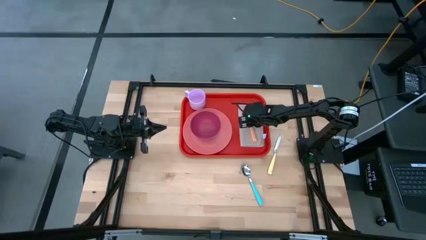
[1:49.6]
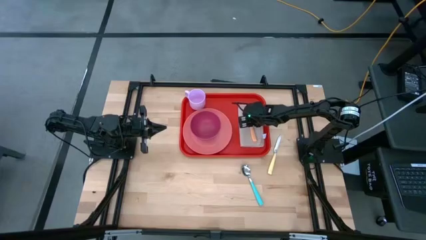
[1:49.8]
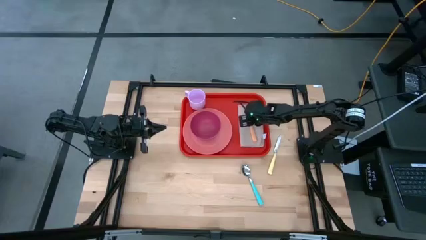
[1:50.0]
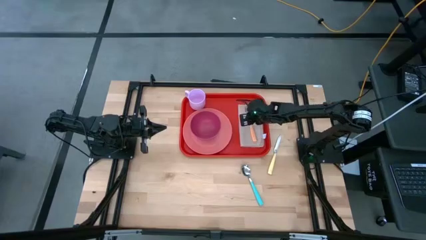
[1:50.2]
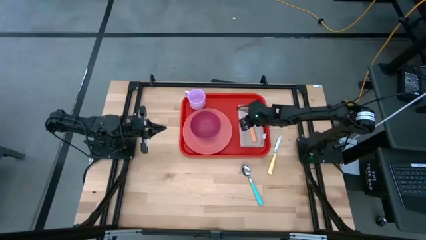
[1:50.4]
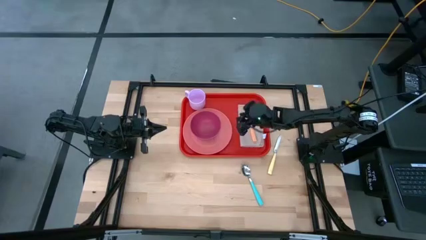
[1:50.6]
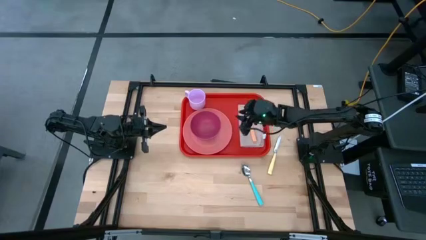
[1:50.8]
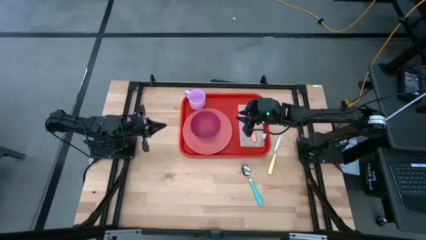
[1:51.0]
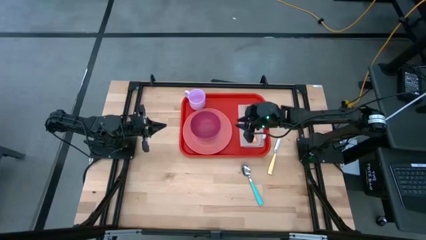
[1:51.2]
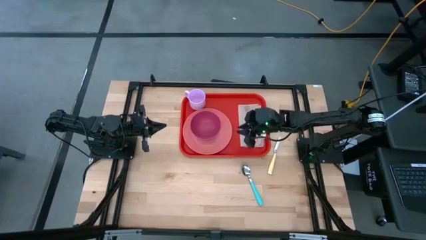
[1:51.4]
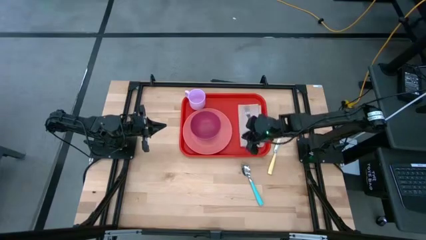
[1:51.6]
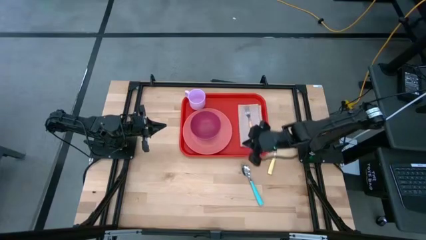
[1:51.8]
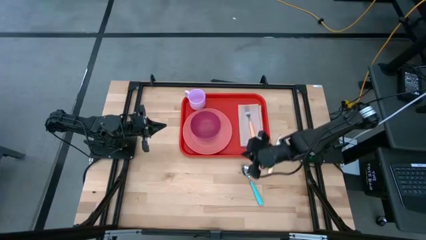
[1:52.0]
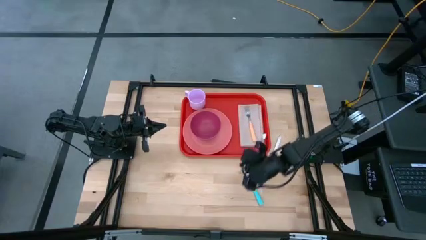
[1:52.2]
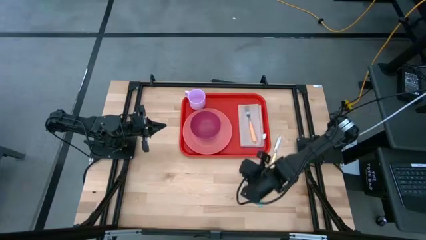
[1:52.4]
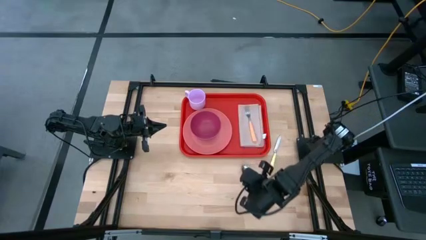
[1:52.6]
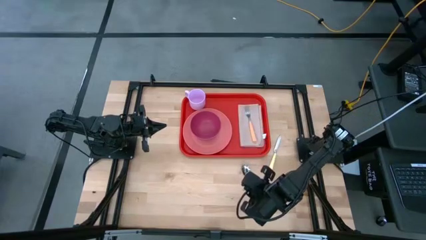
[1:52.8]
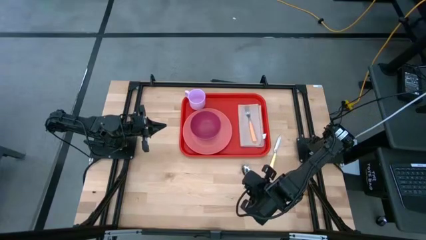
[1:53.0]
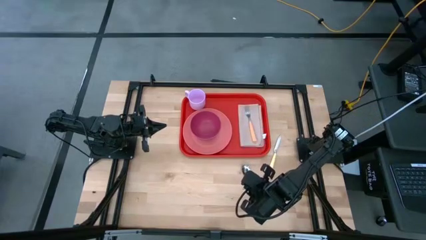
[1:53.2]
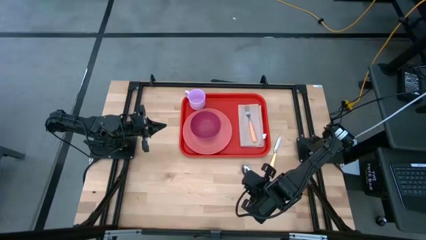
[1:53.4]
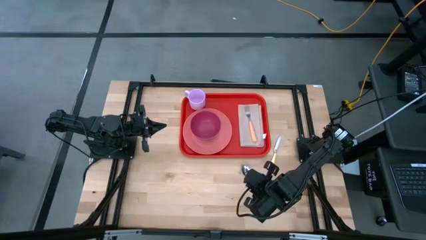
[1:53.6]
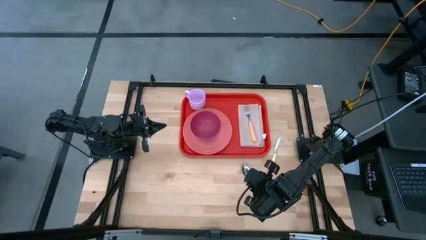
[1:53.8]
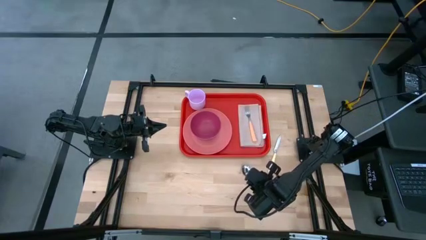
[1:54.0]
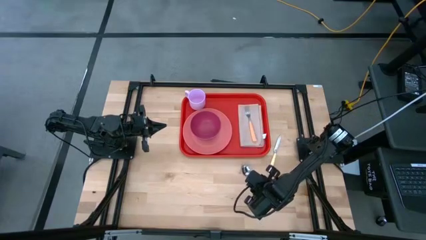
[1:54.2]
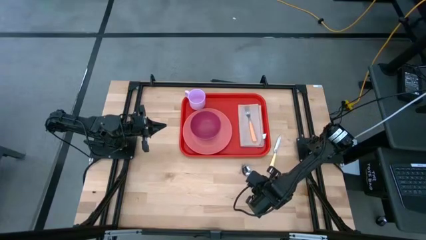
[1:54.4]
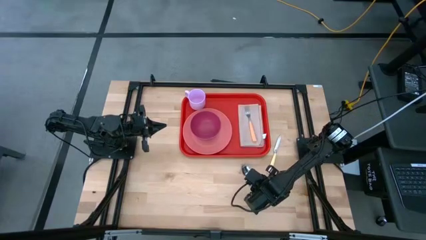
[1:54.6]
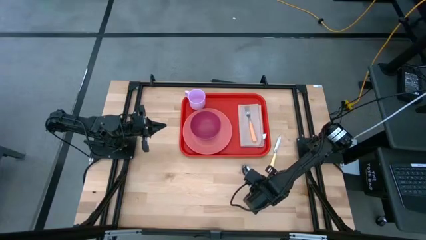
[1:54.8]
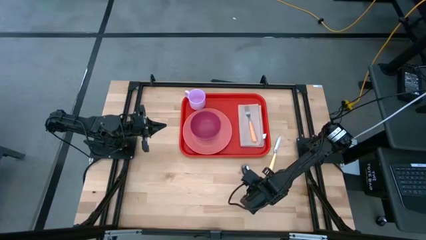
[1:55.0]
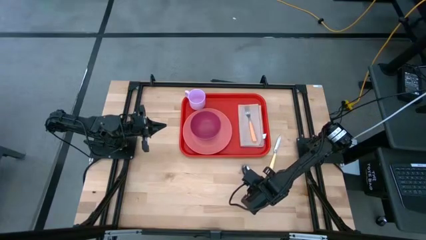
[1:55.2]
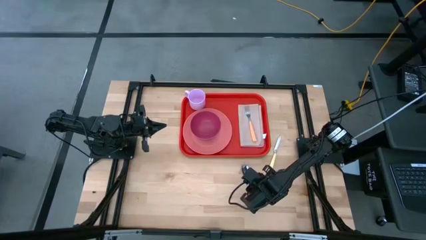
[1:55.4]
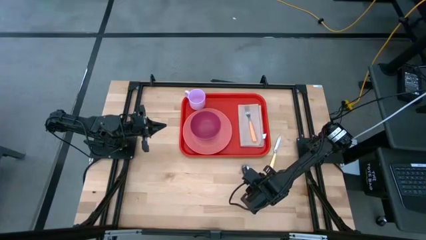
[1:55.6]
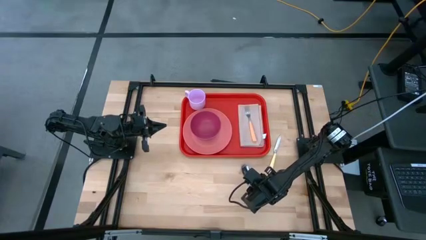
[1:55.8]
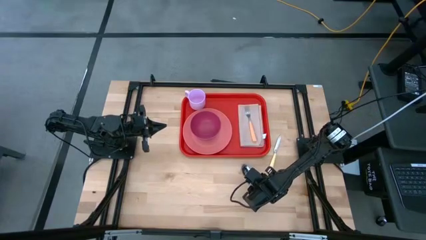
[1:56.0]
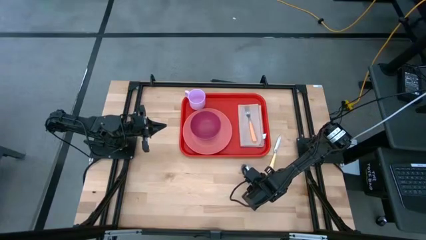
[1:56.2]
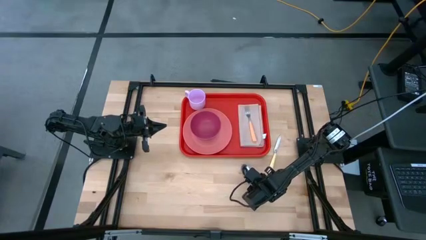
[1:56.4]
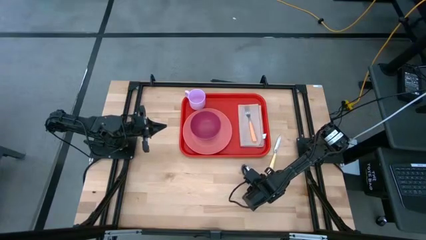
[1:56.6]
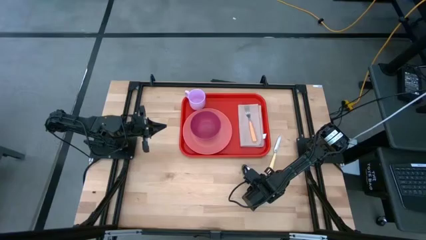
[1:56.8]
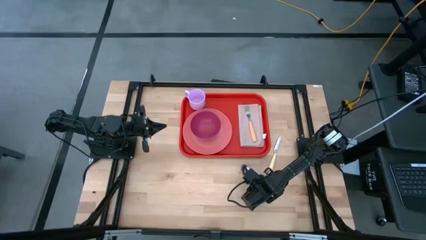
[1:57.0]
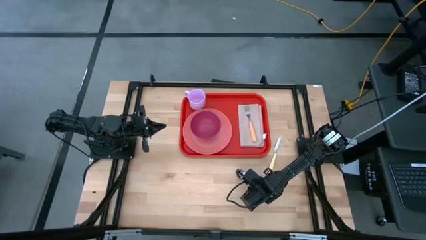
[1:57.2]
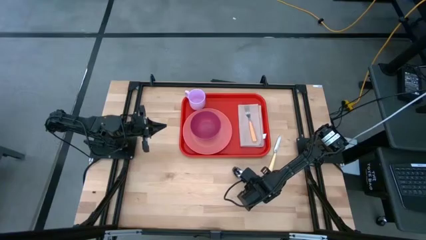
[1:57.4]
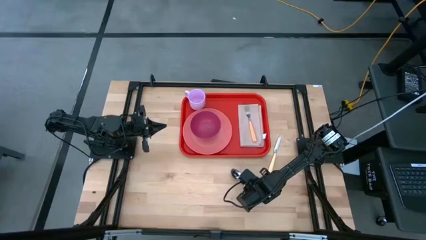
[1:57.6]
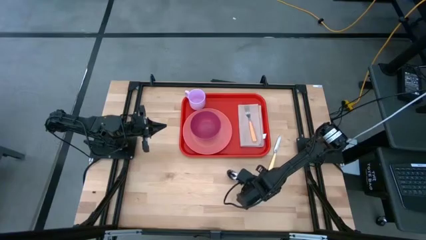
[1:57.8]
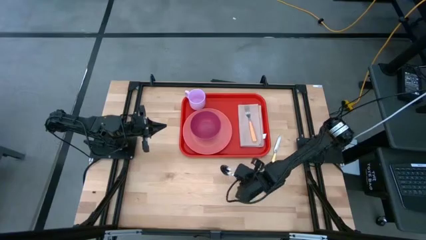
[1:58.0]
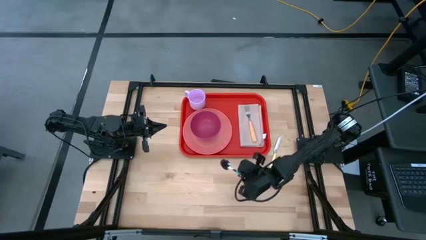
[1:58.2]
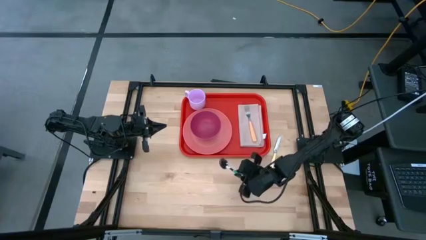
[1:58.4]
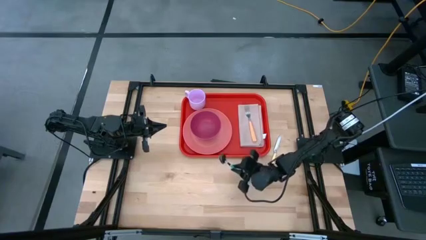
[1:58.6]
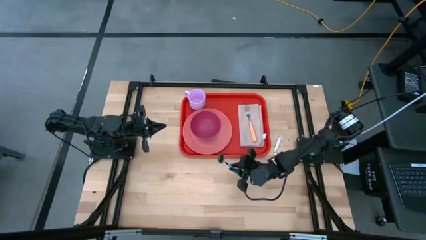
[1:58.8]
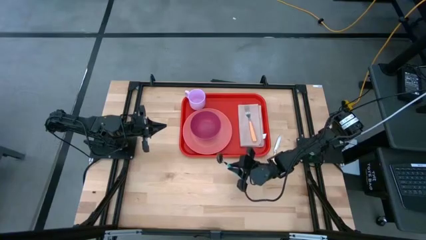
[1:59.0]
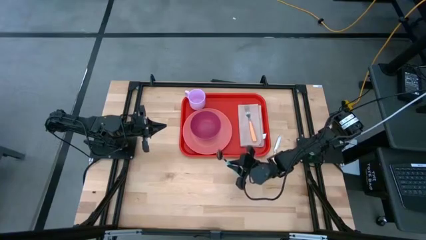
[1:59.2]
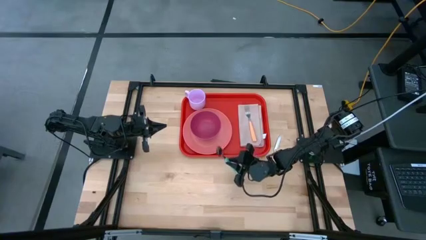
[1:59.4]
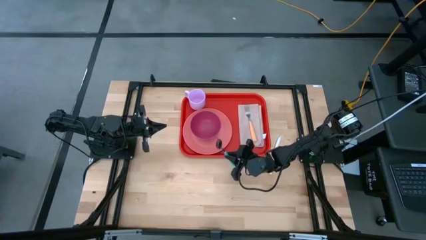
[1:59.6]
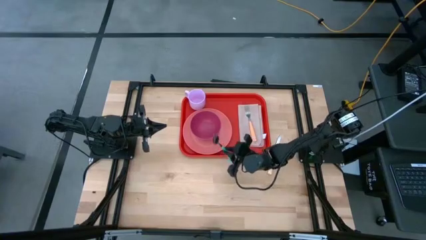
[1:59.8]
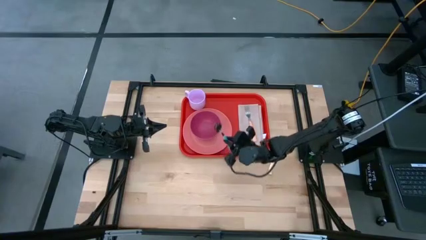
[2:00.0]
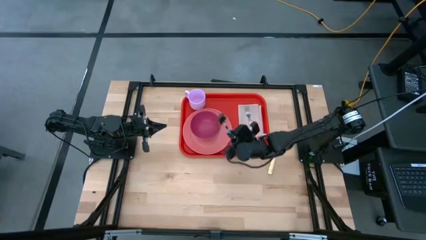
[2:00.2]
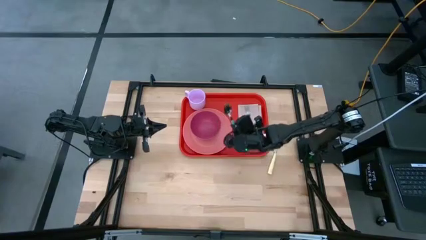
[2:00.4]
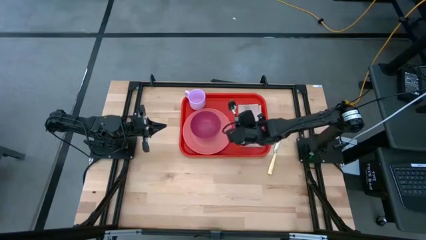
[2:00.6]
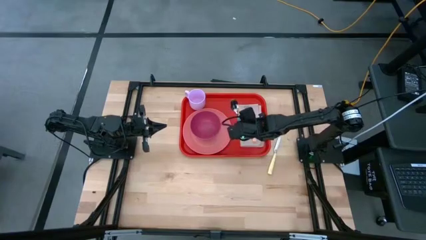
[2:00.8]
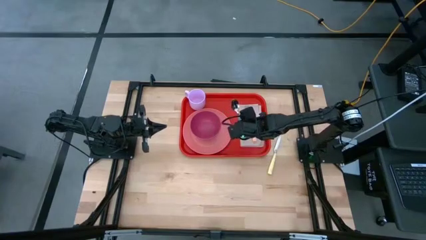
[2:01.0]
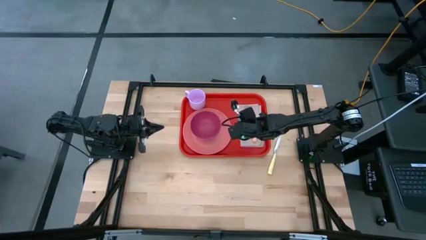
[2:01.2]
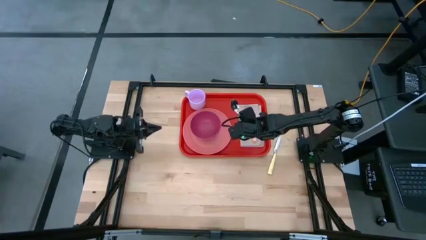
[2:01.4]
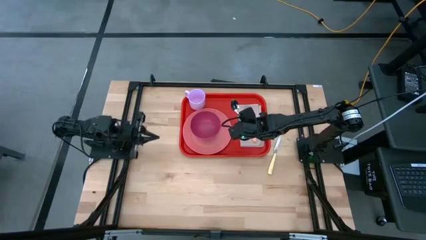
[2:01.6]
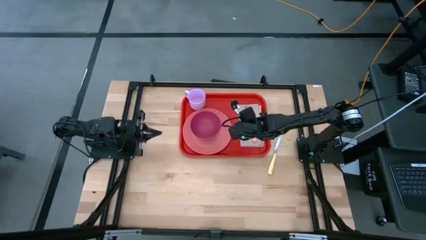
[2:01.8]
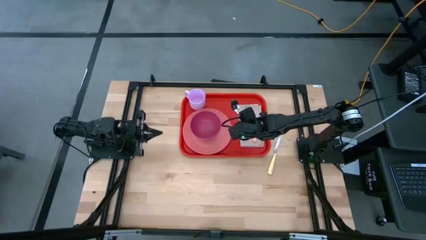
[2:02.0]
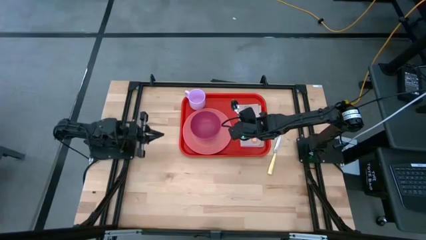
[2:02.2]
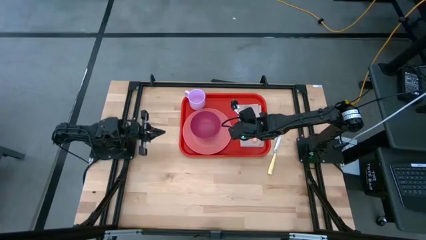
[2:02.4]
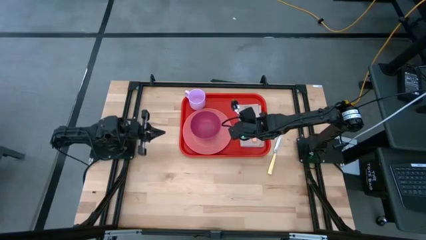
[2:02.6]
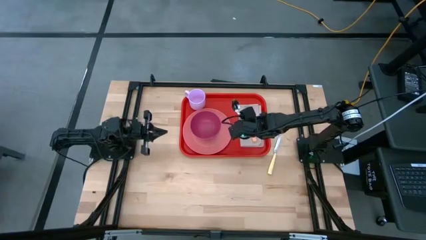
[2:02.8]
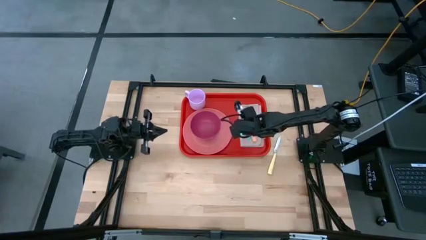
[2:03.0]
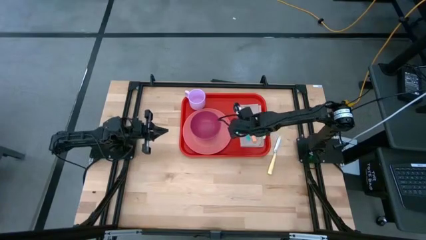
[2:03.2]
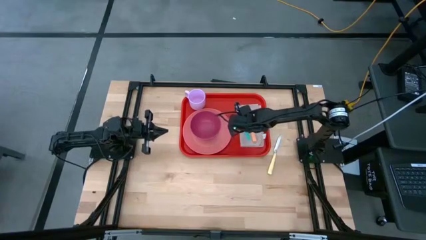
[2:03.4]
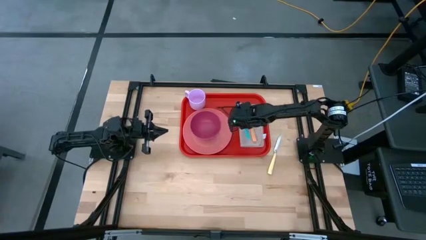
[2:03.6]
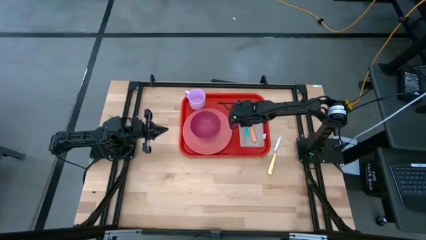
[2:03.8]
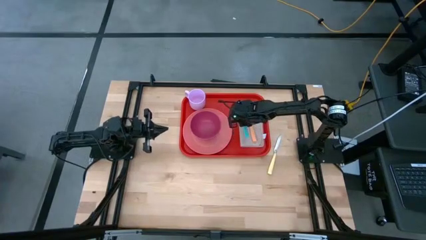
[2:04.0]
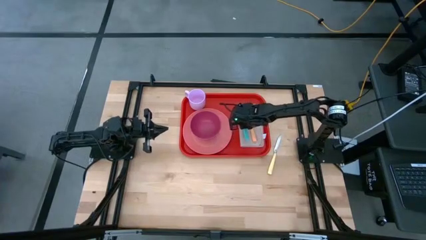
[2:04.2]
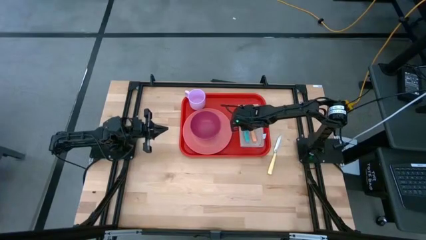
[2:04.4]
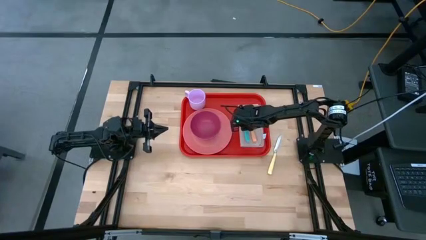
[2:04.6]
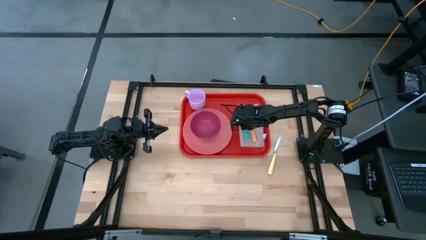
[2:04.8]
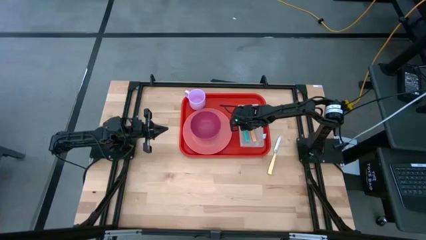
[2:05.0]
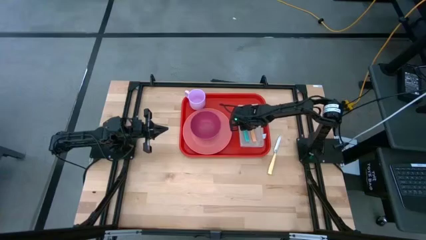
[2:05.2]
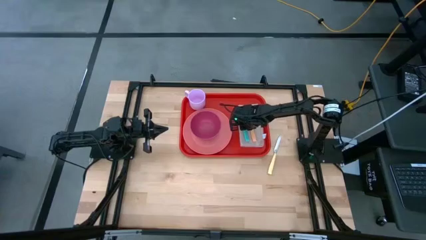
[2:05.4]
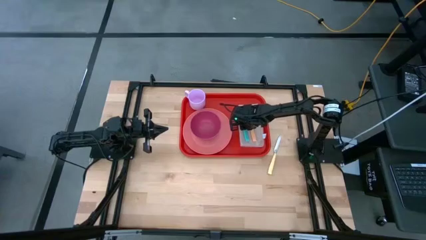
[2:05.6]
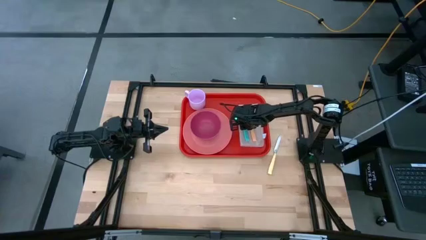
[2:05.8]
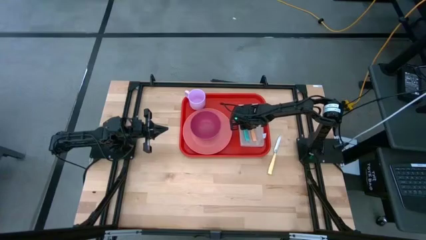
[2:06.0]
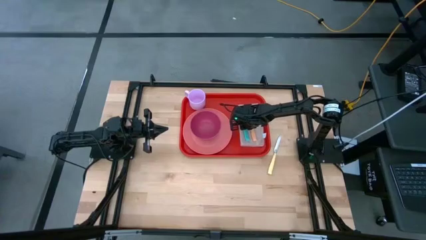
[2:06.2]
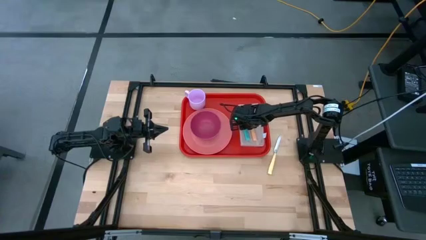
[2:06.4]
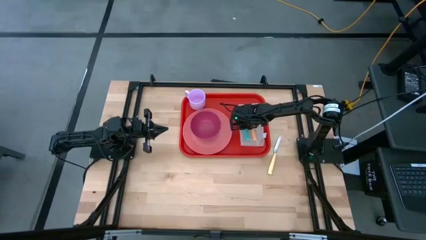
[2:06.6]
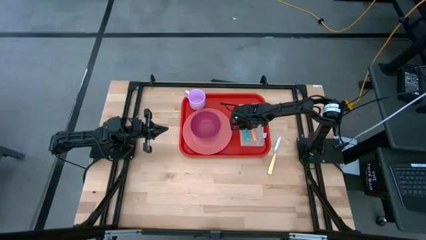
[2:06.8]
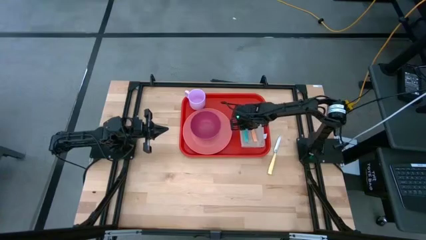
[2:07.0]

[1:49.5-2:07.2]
Task: Set up tray
Put the blue spoon on the brown table napkin to the left of the orange fork
